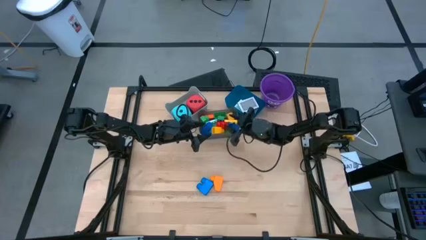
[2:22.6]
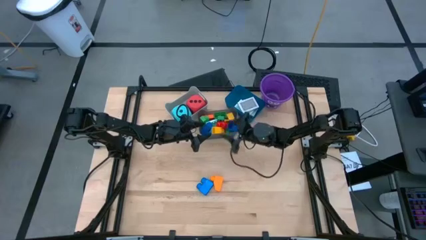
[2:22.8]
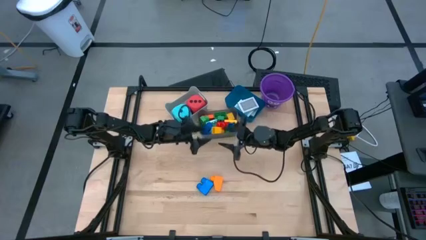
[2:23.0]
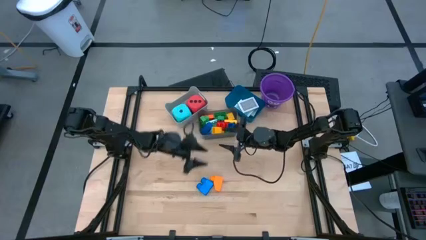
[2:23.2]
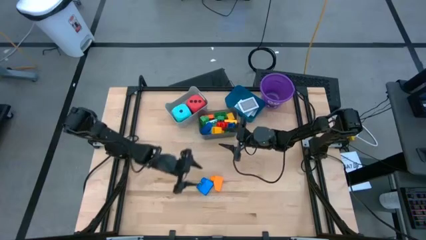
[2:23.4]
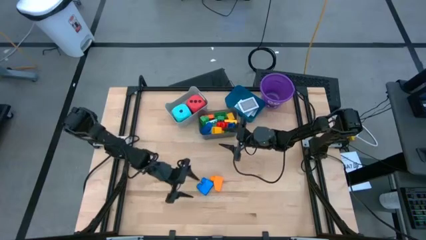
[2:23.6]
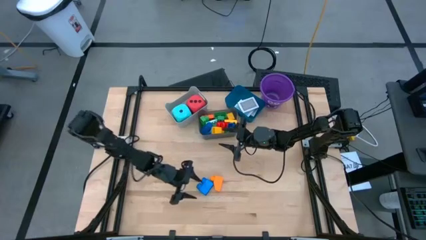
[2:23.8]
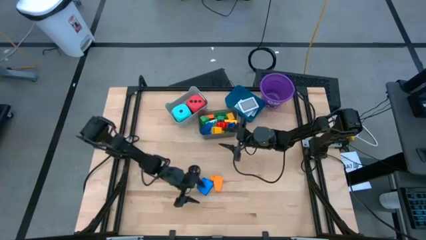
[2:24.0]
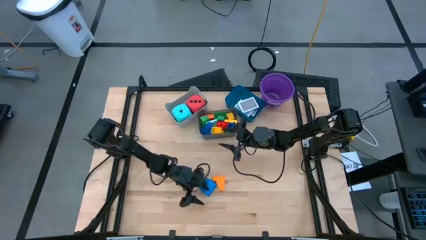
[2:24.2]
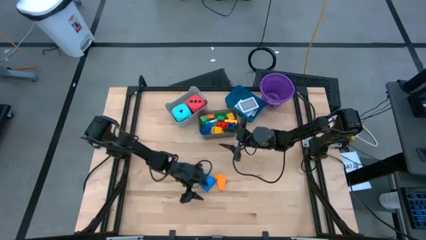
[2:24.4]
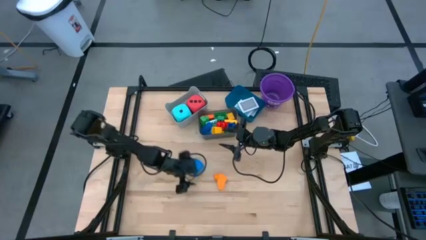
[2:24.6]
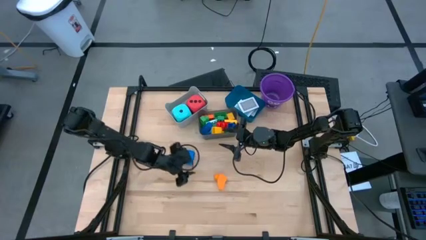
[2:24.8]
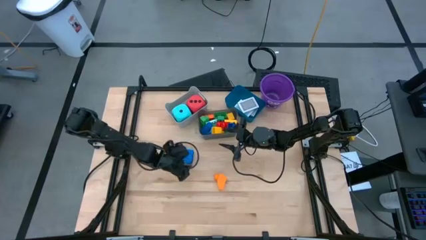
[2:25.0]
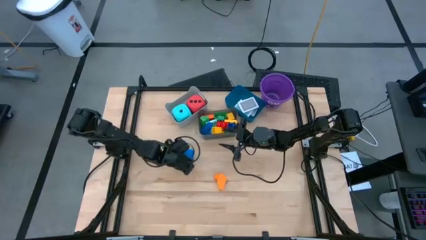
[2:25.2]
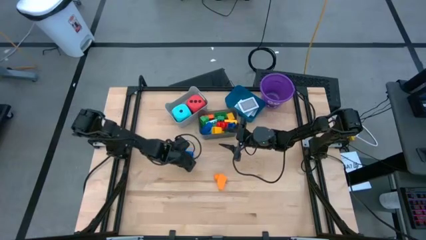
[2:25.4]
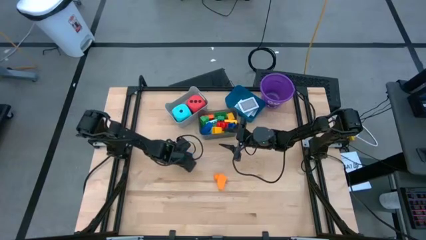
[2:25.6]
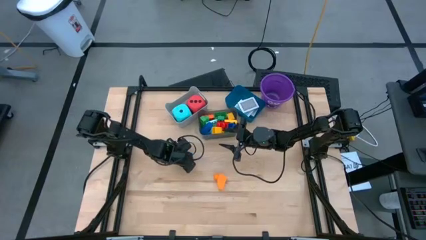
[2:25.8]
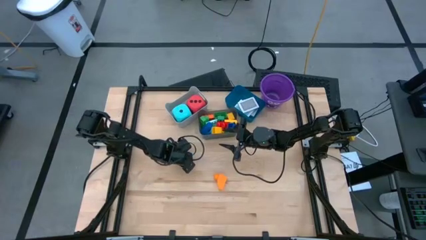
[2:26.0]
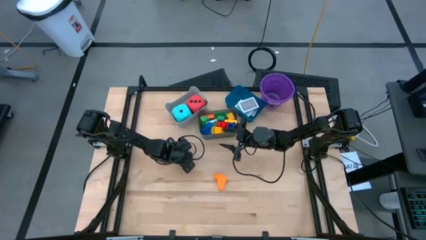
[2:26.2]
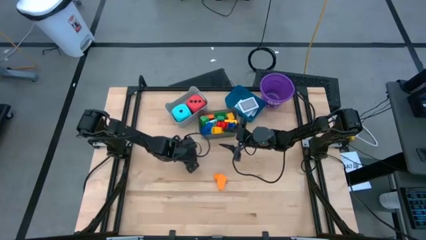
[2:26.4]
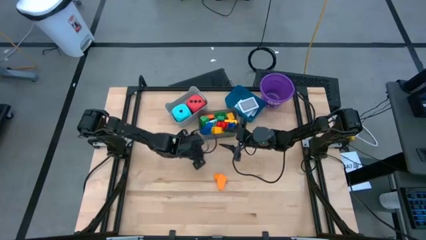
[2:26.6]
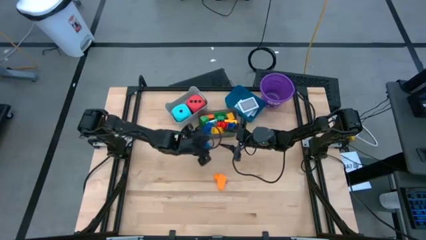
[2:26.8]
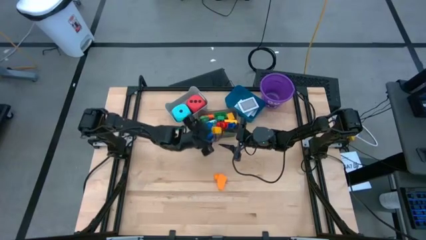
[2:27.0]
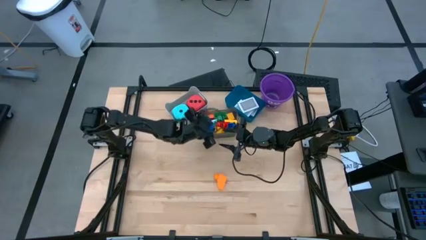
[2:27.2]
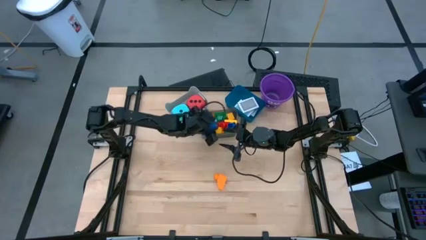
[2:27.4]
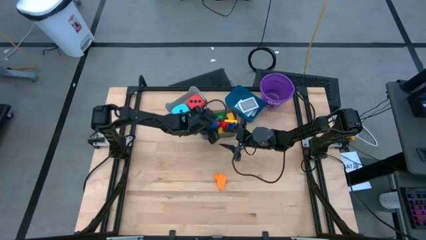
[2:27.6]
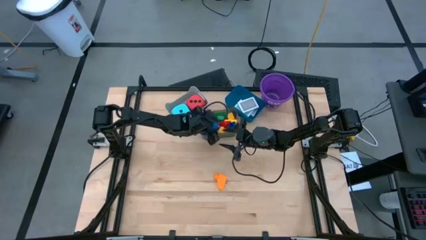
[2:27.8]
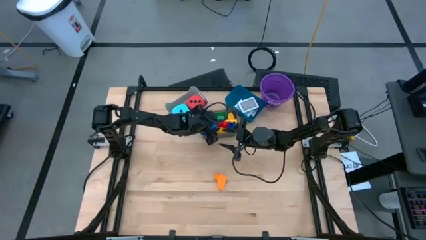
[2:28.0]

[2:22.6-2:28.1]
Task: Pick & Place Toys
Put the light blue block into the black bin

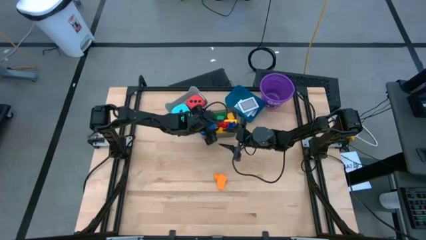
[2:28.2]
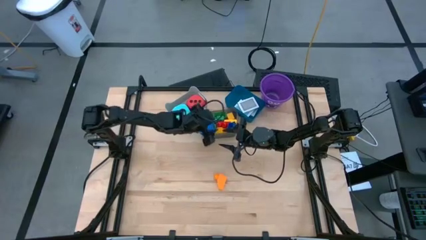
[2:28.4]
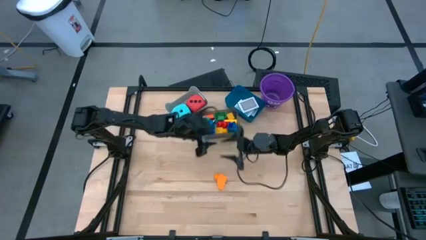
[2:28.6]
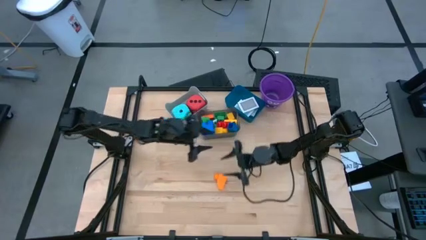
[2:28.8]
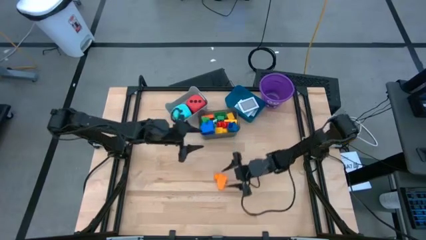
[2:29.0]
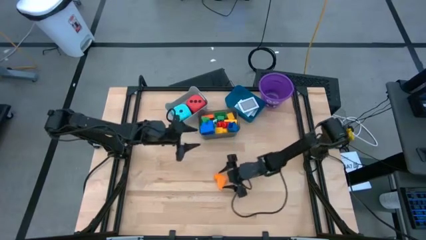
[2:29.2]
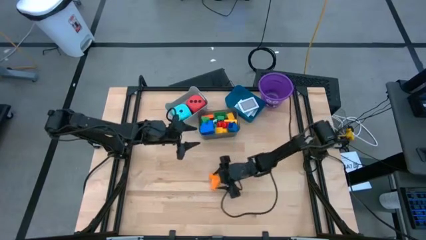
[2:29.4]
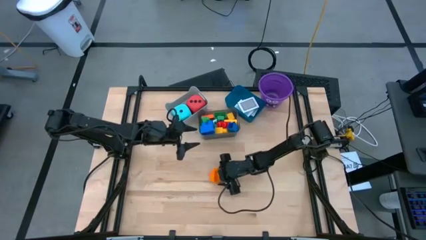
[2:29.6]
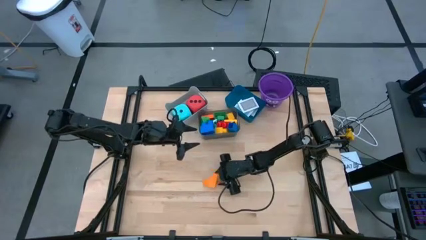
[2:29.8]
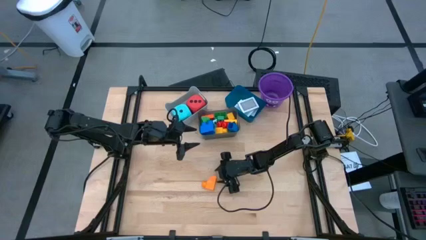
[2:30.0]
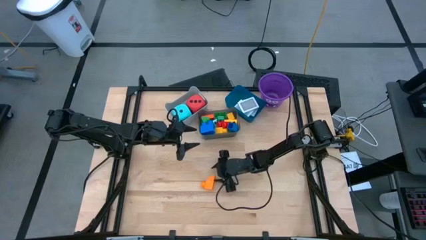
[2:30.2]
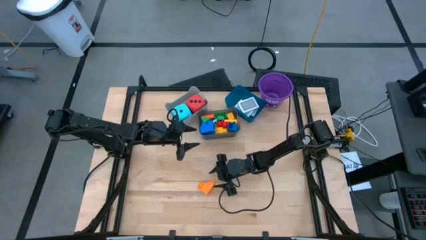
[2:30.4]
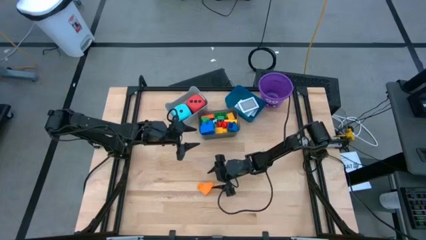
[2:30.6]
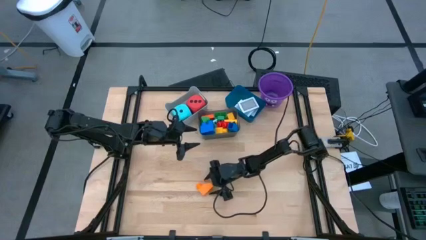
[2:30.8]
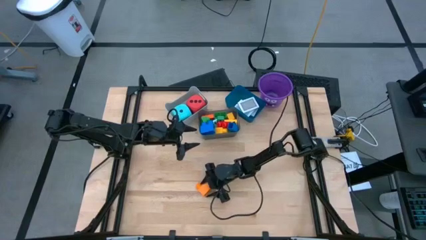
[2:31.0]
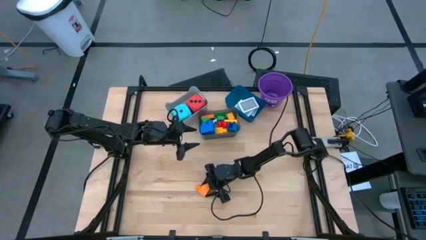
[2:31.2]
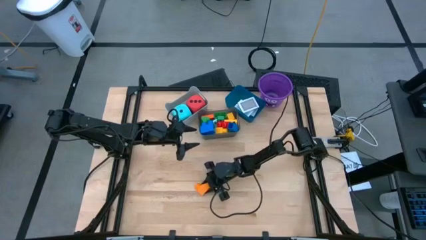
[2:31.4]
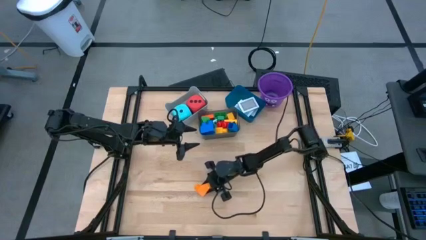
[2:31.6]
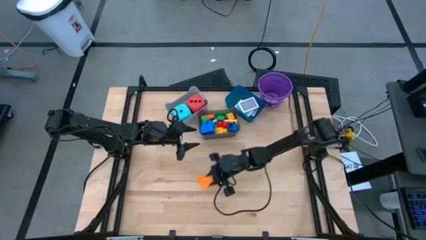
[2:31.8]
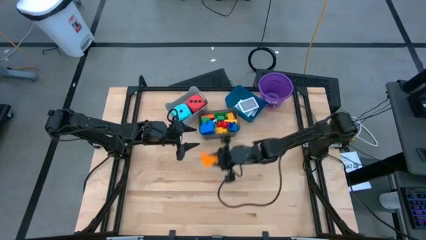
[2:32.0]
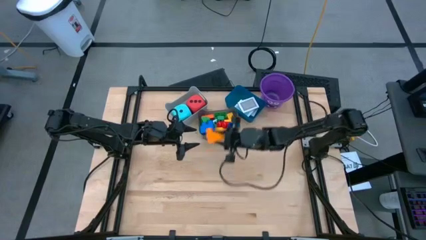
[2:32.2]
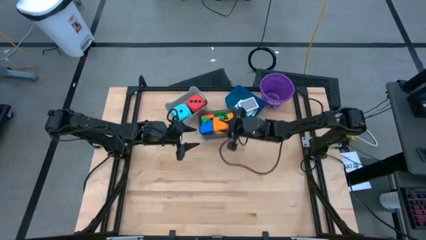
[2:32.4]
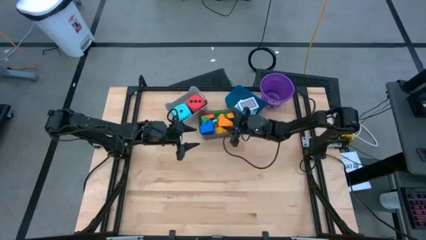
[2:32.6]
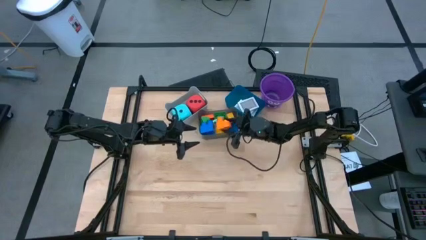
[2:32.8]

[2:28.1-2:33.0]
Put the orange block into the black bin

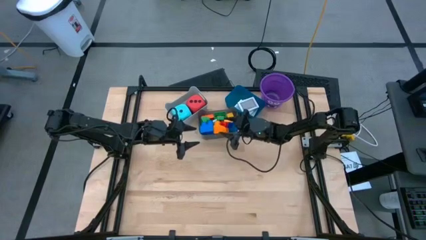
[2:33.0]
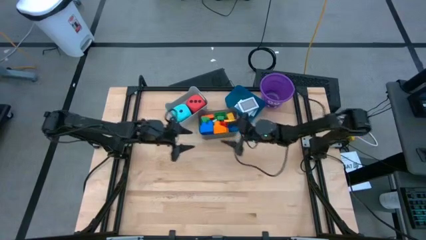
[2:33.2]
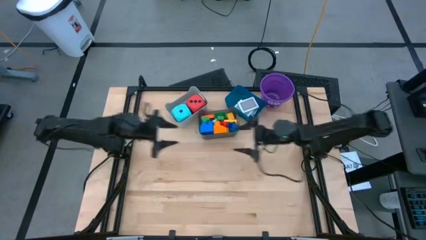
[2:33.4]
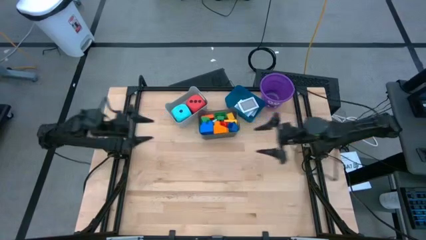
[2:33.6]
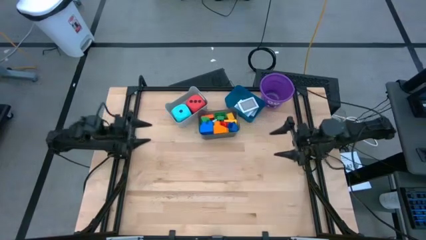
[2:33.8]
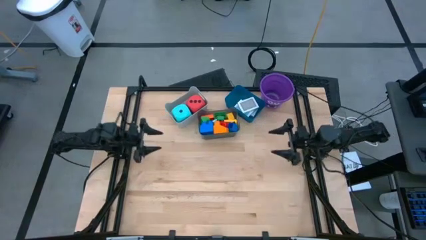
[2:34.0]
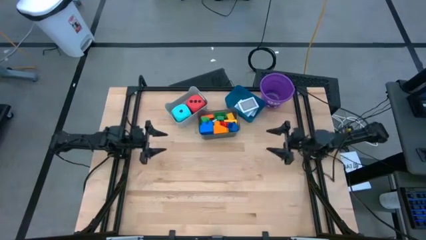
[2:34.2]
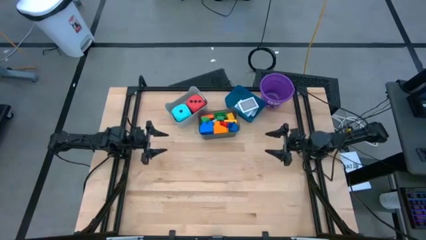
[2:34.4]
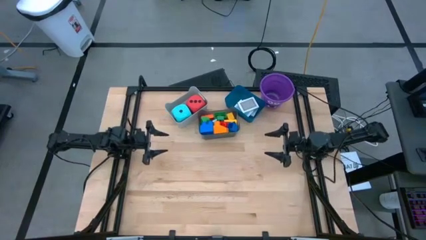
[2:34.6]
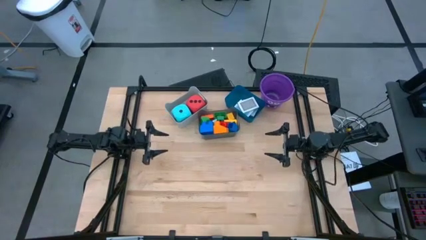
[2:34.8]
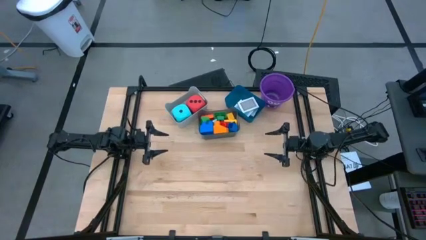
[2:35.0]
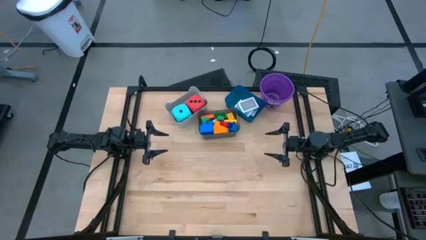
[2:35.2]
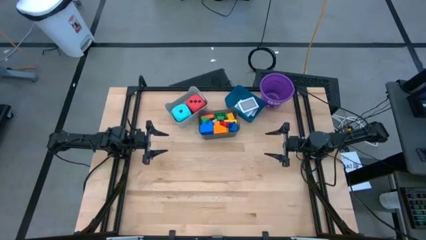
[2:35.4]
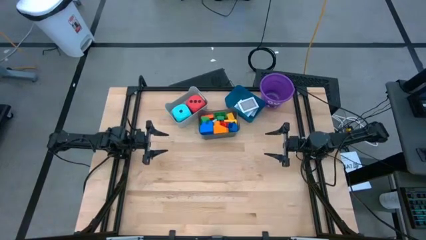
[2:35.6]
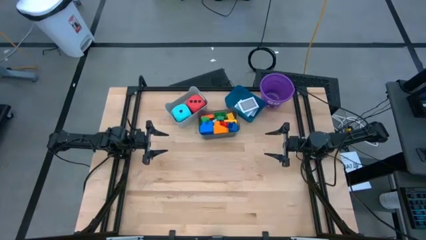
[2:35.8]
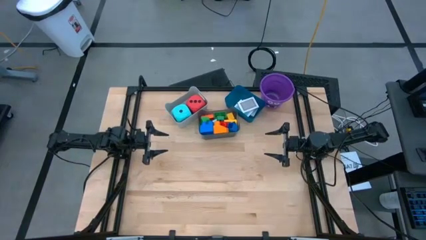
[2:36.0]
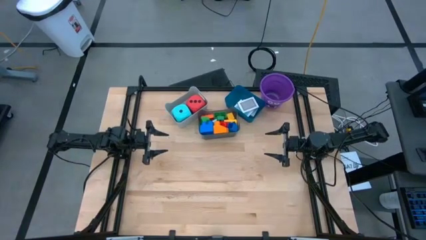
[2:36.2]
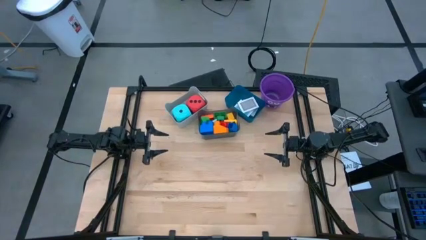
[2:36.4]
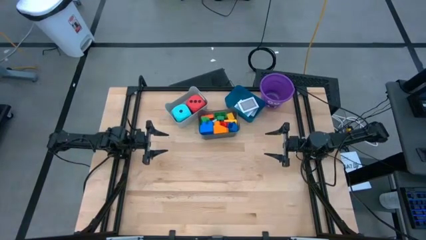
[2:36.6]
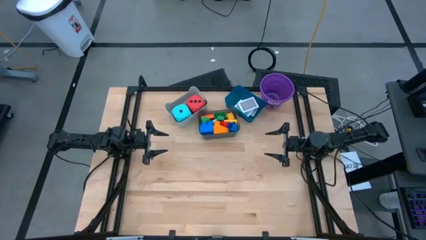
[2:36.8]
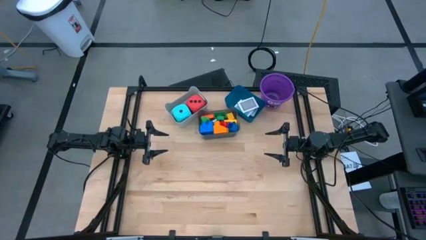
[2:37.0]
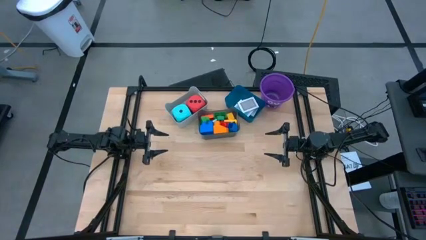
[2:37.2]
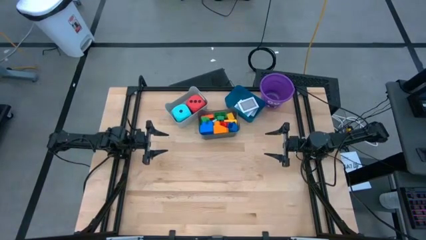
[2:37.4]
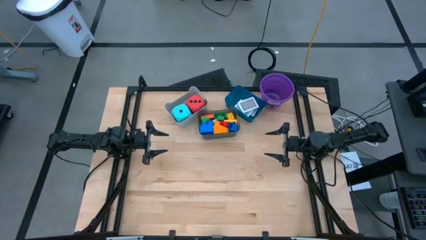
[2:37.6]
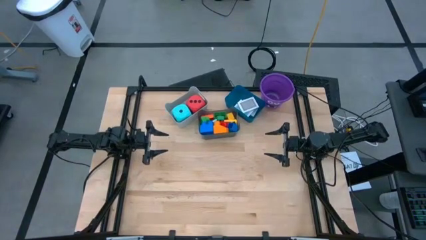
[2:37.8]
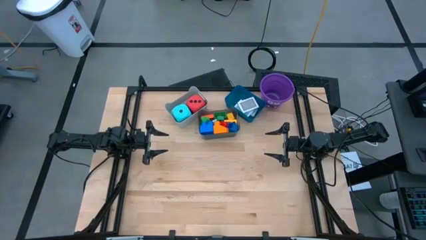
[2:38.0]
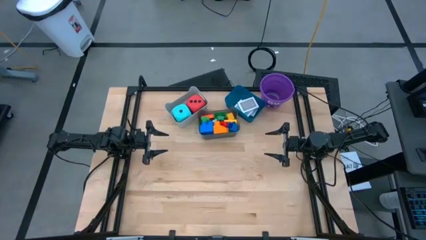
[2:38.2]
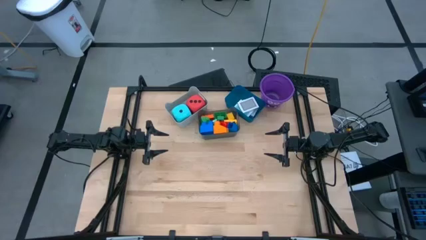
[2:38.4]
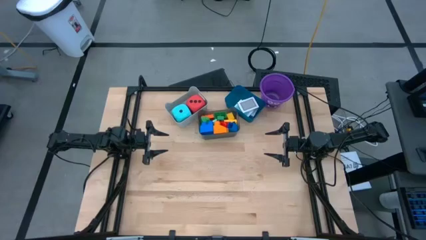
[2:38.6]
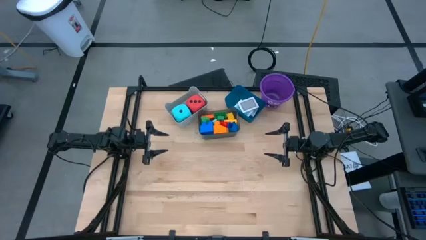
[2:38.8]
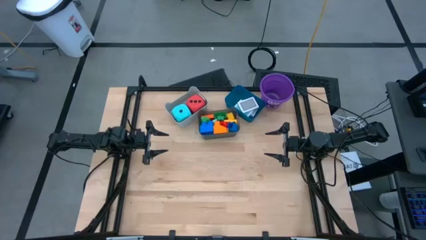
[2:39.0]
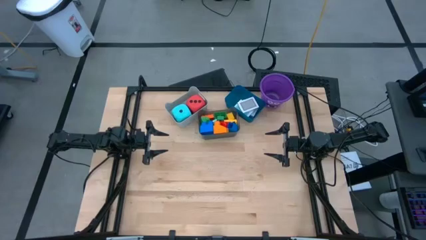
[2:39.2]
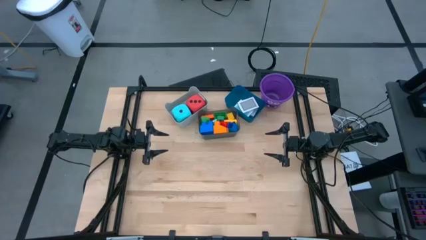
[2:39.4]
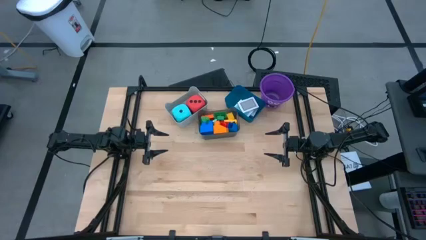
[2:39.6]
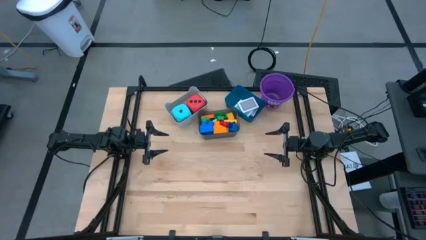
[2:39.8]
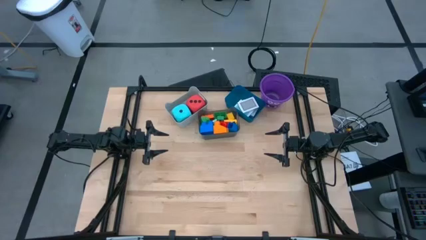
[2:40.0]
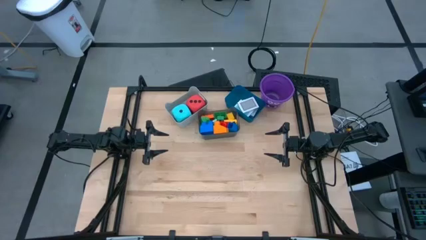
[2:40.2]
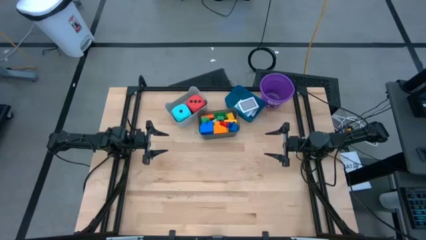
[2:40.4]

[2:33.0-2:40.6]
Return to Home Position
